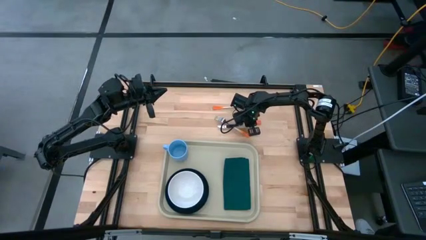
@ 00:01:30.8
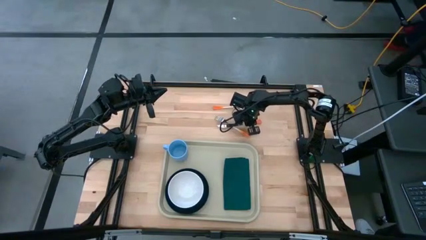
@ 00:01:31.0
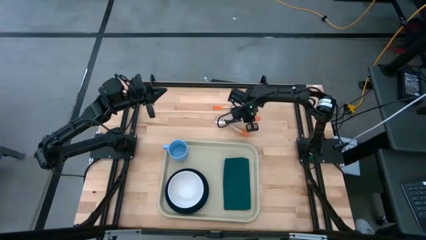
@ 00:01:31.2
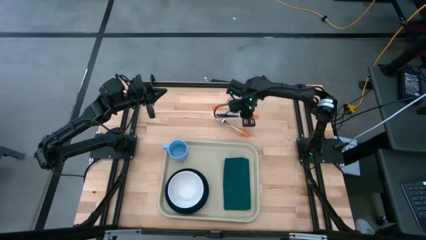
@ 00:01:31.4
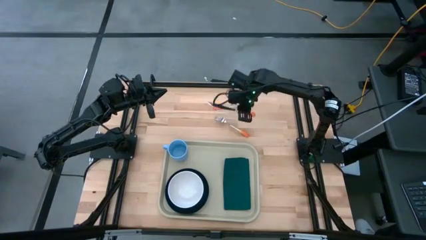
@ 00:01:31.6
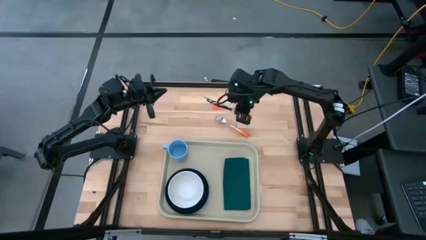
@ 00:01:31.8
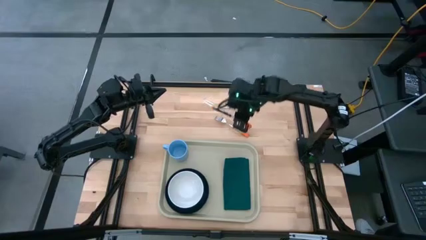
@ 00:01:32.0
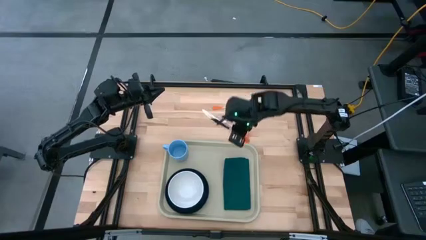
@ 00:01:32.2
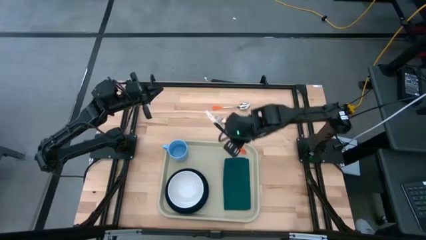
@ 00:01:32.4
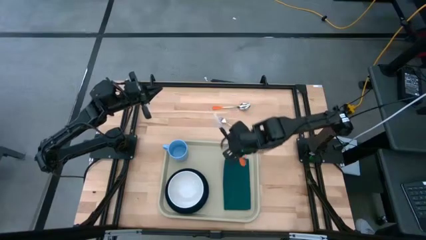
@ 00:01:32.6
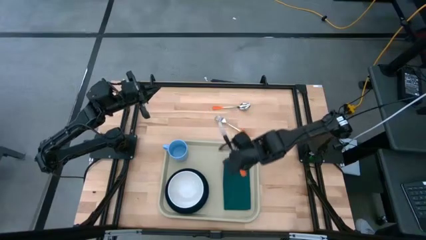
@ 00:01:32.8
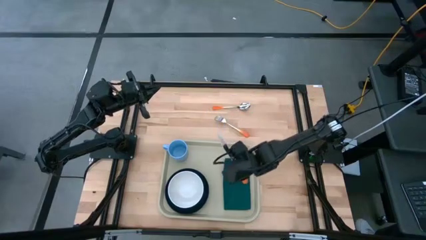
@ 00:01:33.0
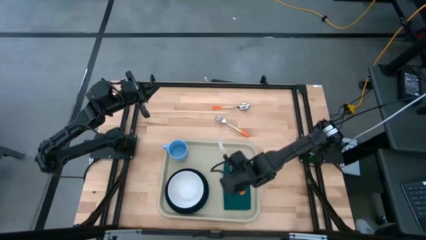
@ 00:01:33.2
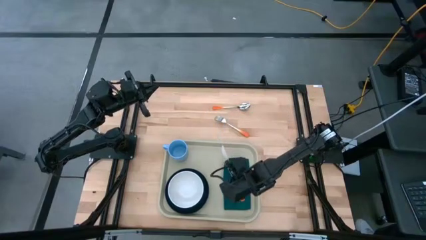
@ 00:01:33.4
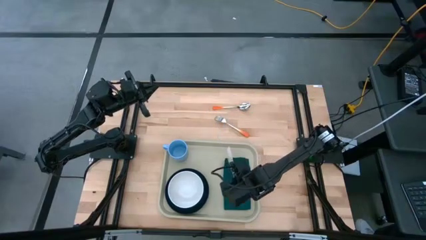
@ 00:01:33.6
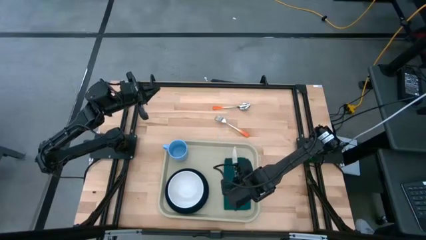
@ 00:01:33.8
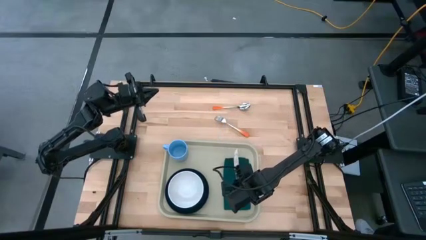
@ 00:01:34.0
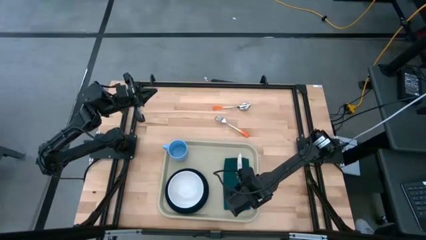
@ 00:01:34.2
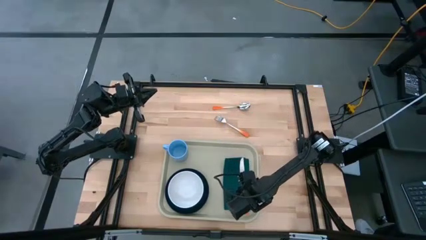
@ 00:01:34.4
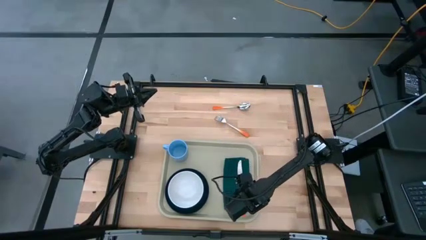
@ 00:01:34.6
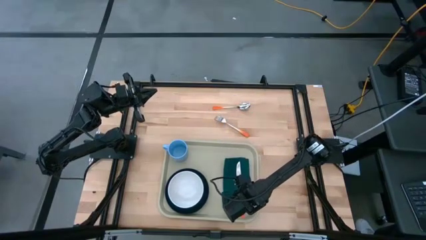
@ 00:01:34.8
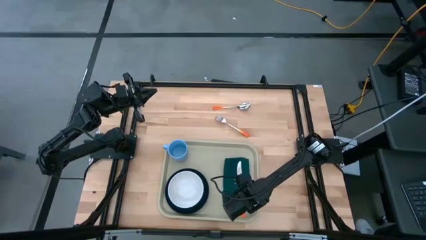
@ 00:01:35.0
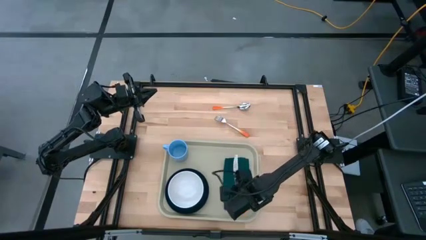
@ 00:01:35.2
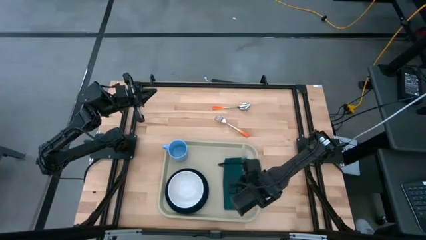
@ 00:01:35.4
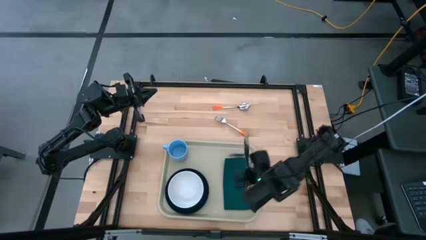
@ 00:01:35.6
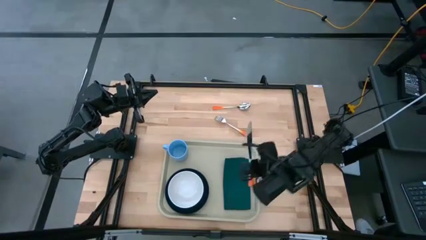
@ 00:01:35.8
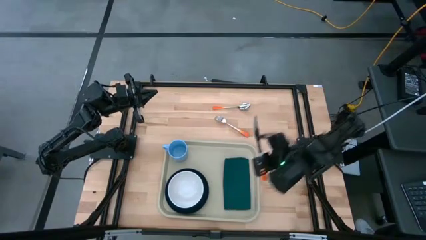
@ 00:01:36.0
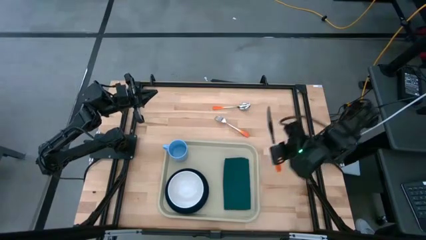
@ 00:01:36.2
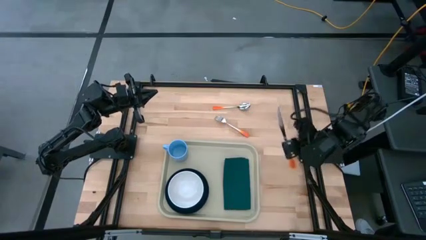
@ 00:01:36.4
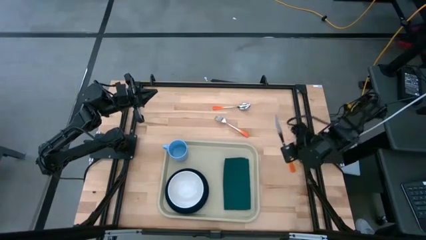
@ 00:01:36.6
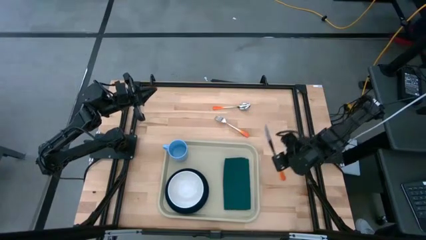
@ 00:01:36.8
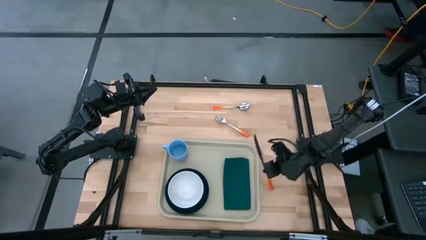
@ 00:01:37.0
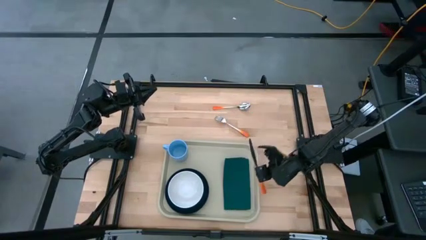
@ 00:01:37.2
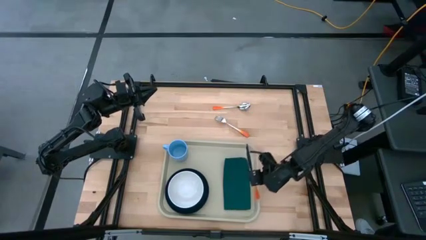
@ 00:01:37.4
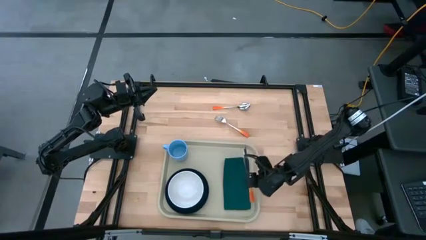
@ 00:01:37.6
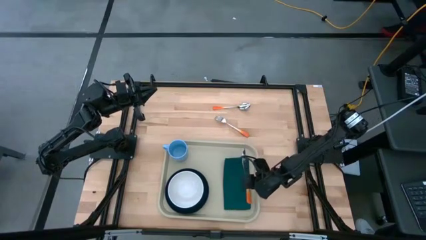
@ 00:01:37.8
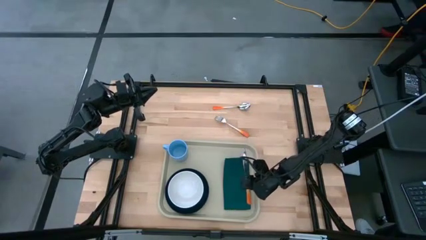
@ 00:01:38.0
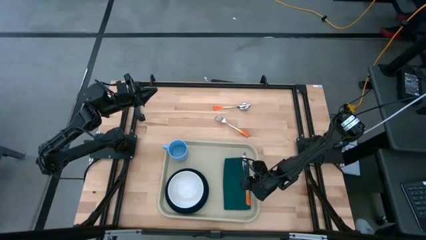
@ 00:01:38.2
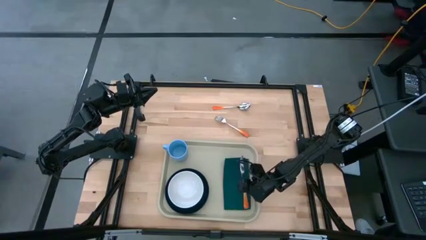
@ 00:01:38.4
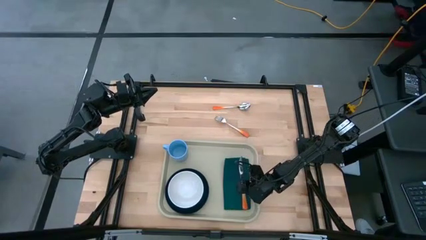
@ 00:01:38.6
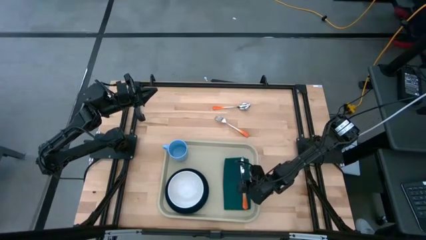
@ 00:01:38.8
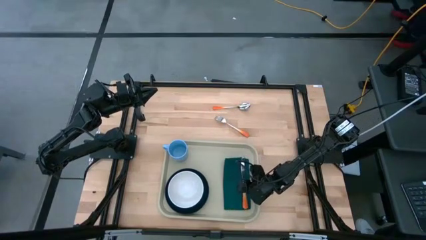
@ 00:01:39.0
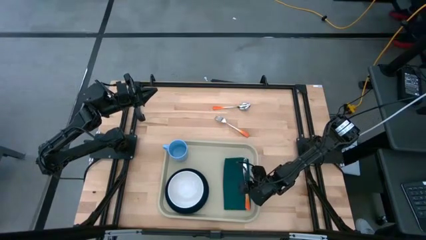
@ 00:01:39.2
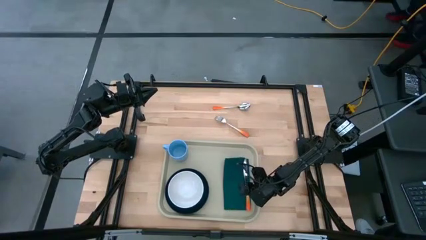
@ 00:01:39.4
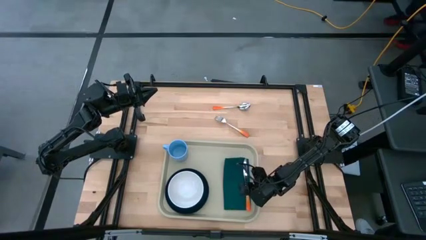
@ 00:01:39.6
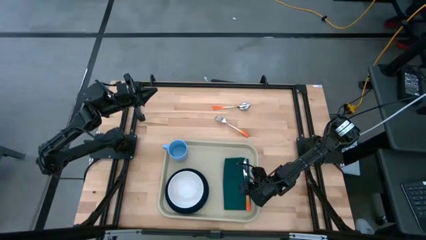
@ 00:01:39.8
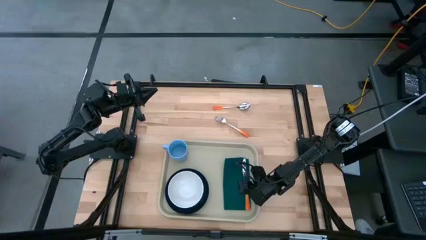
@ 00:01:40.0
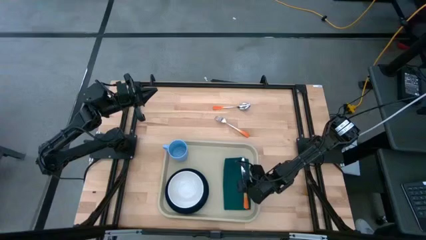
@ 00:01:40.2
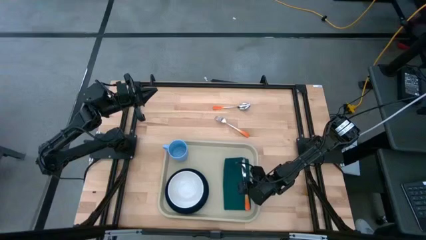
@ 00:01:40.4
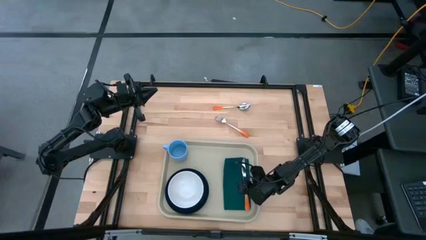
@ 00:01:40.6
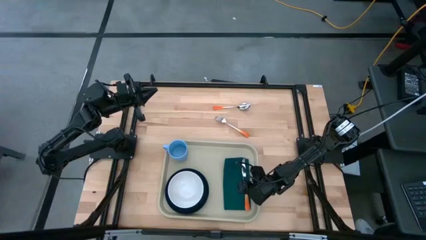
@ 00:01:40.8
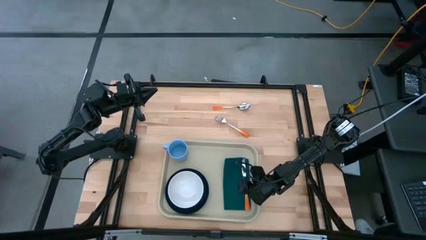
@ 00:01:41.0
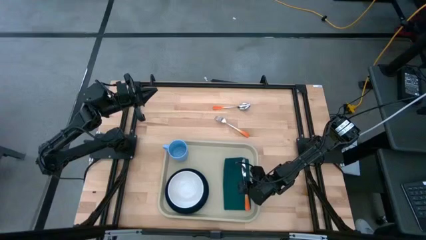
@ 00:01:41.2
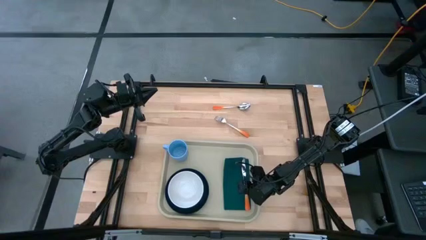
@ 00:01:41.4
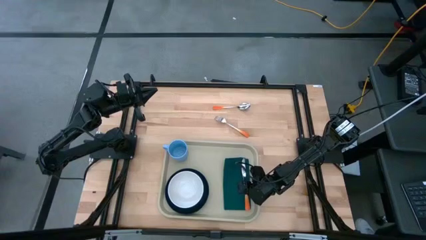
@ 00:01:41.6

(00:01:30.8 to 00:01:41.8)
Task: Set up tray
Put the orange knife on top of the green napkin on the gray tray

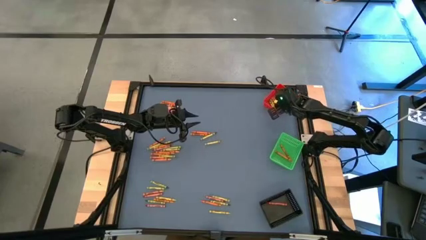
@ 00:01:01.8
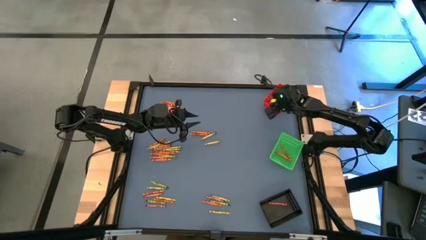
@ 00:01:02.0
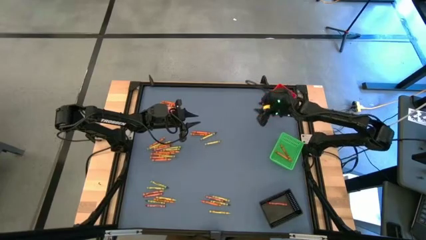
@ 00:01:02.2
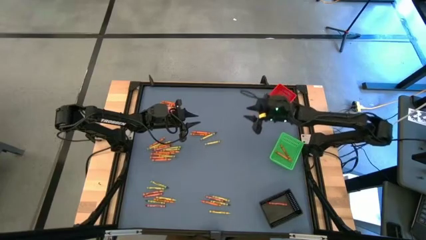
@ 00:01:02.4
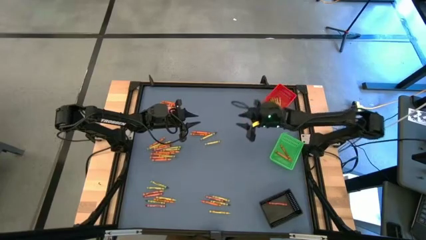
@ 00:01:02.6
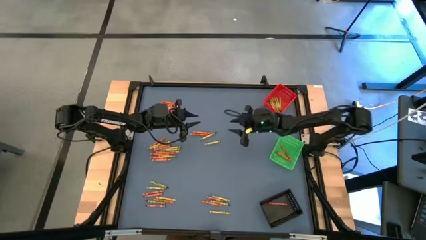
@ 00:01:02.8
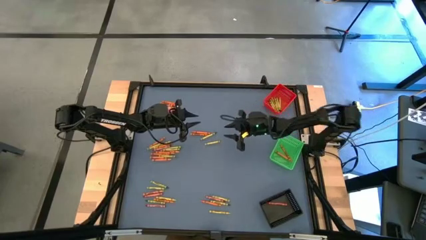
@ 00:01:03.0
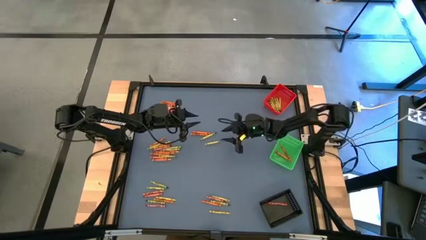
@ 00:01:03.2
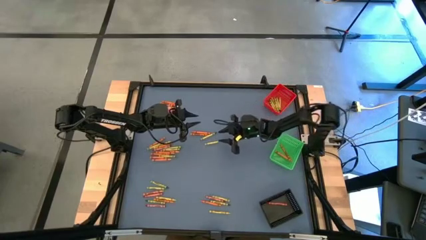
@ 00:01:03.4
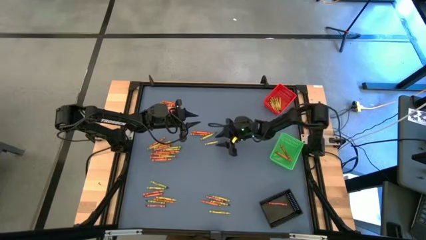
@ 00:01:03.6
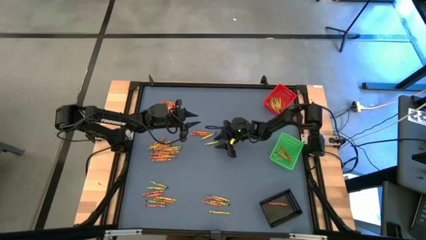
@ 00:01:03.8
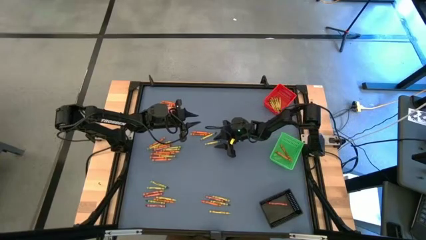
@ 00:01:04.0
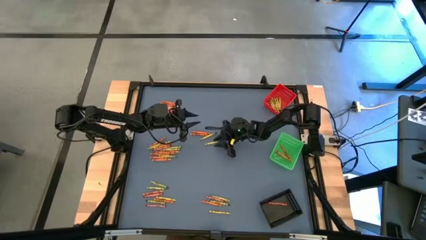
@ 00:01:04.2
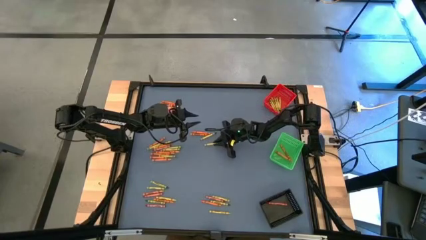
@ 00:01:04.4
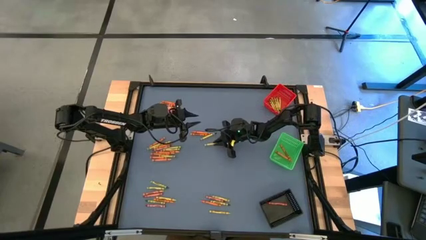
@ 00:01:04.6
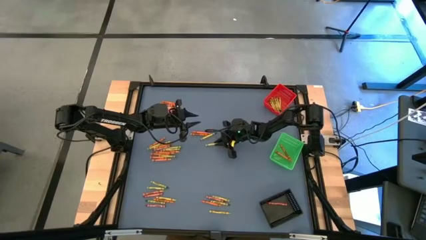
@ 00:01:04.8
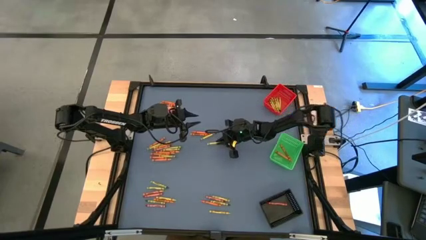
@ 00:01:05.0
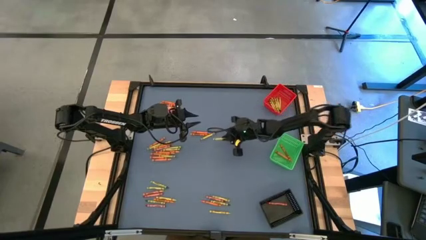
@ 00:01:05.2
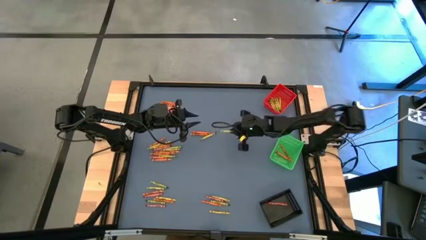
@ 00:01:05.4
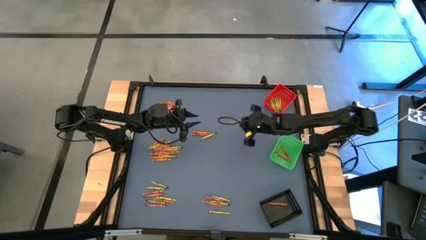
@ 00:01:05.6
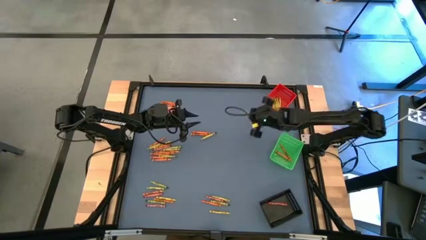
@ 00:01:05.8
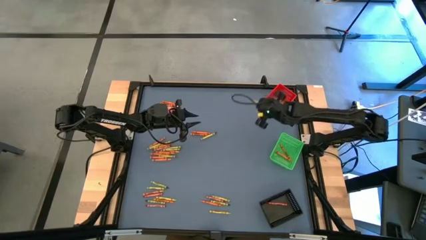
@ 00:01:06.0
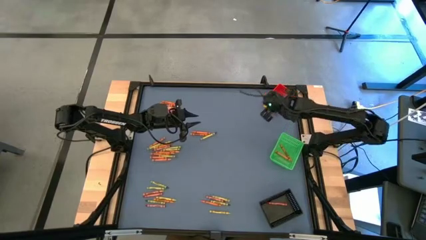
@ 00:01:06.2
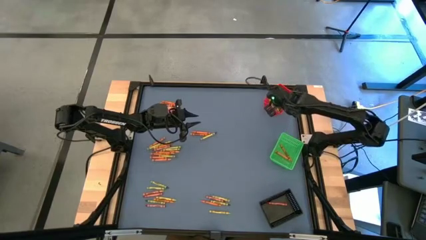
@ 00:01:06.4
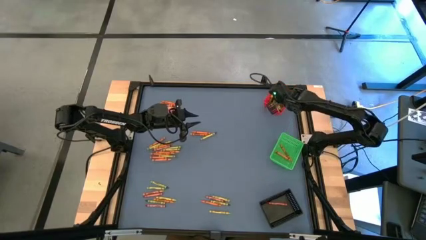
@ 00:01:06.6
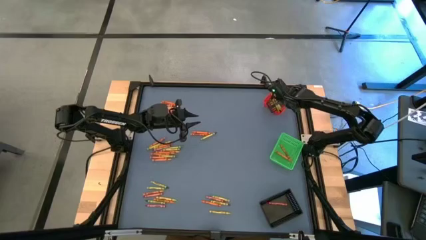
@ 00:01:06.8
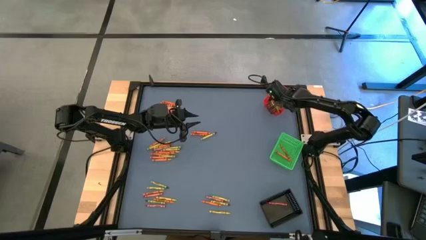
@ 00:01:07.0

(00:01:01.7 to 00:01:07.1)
Task: Sort crayons
Put the green crayon into the red bin
